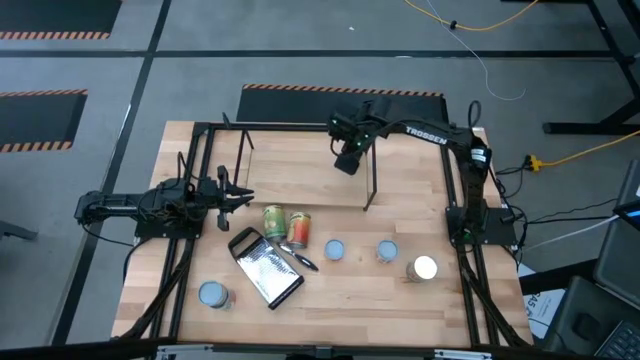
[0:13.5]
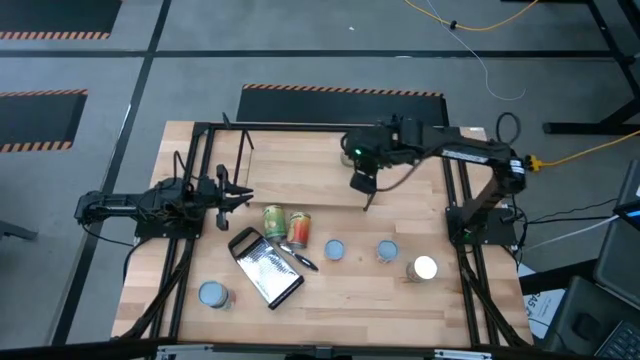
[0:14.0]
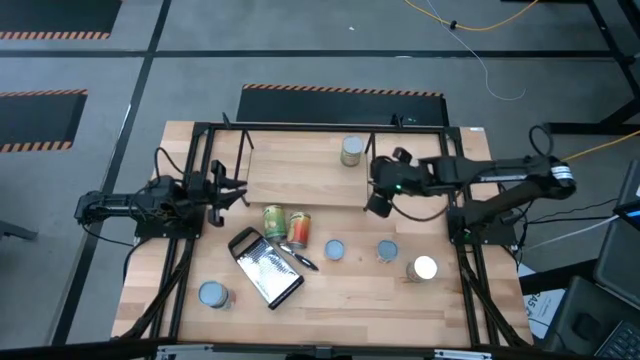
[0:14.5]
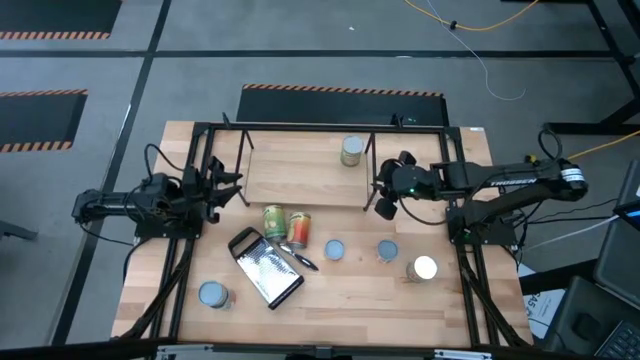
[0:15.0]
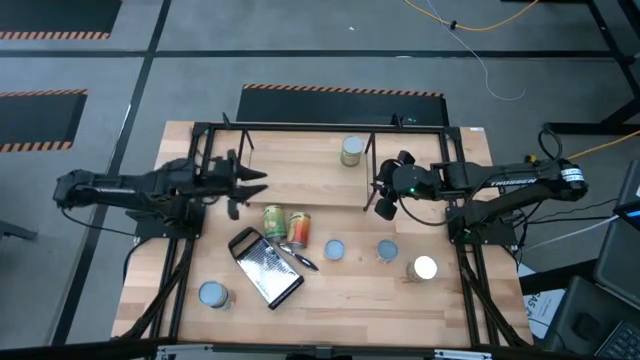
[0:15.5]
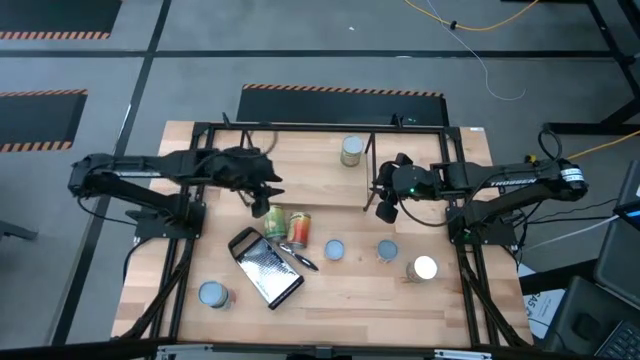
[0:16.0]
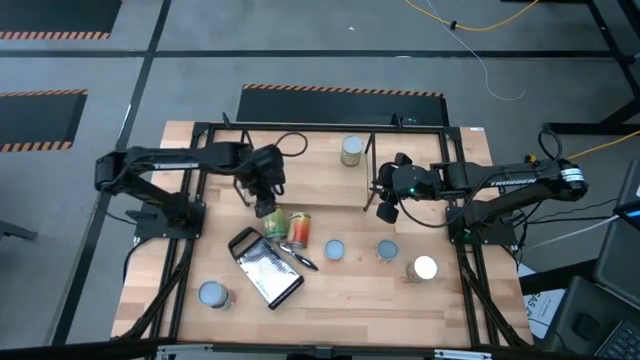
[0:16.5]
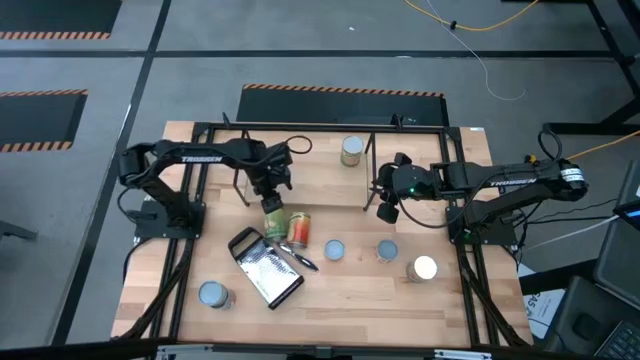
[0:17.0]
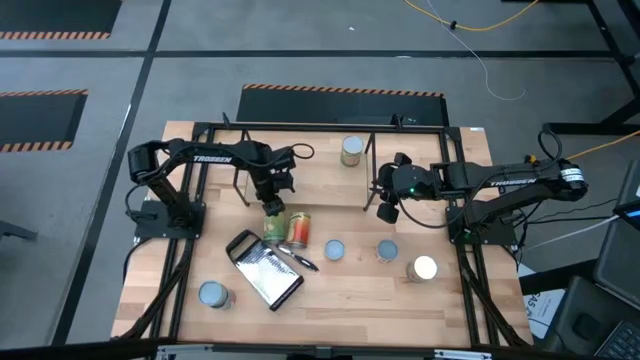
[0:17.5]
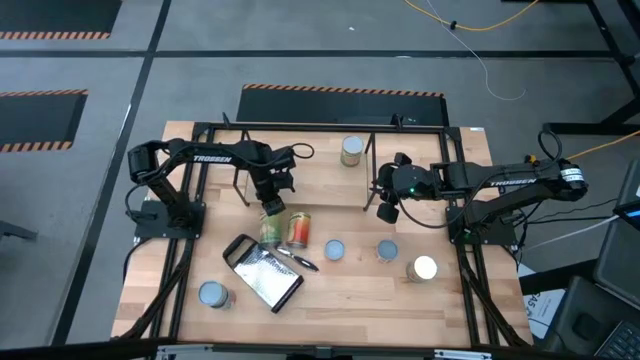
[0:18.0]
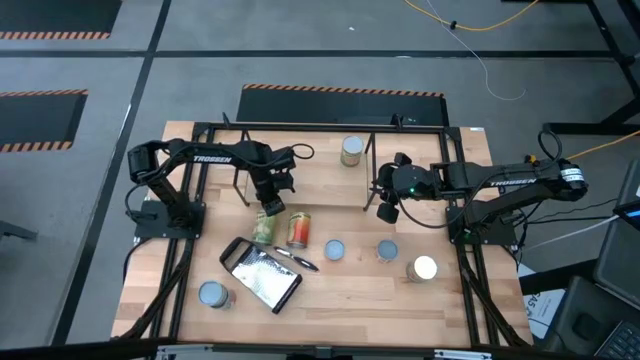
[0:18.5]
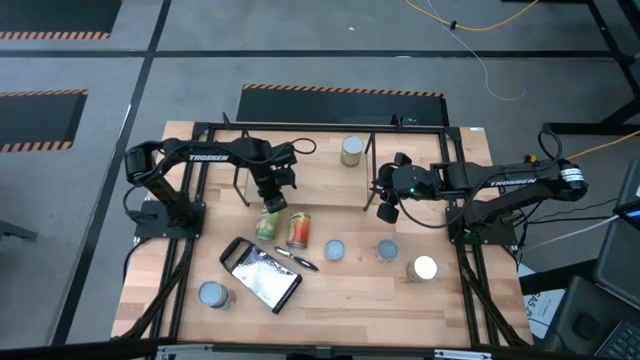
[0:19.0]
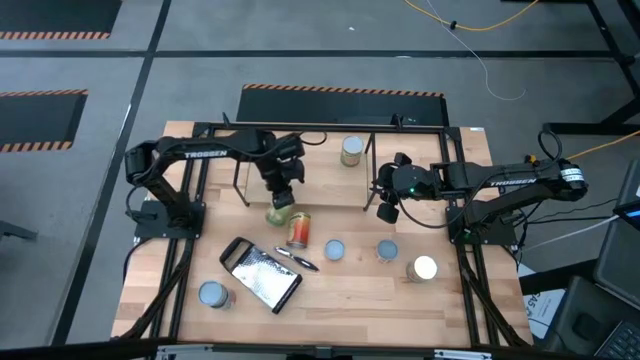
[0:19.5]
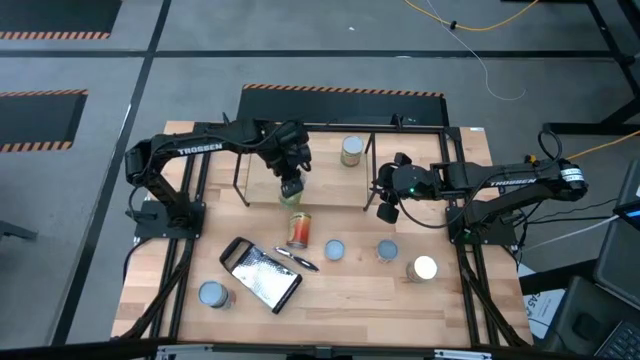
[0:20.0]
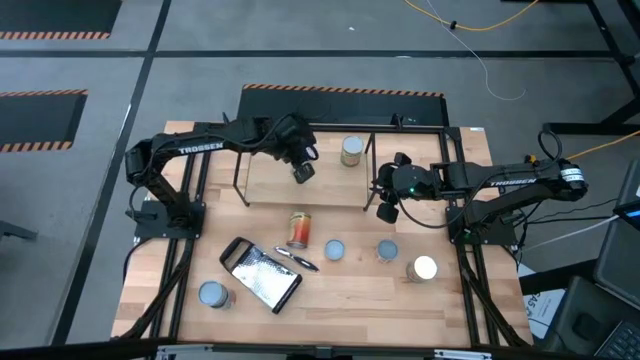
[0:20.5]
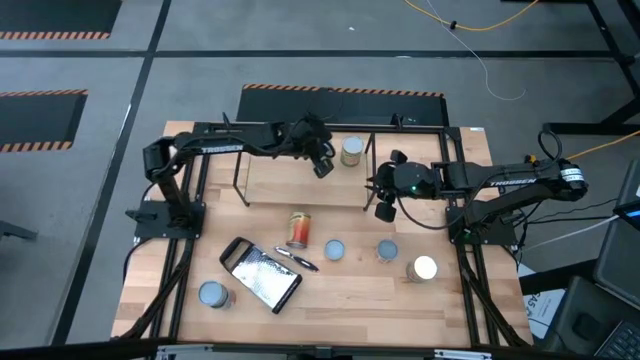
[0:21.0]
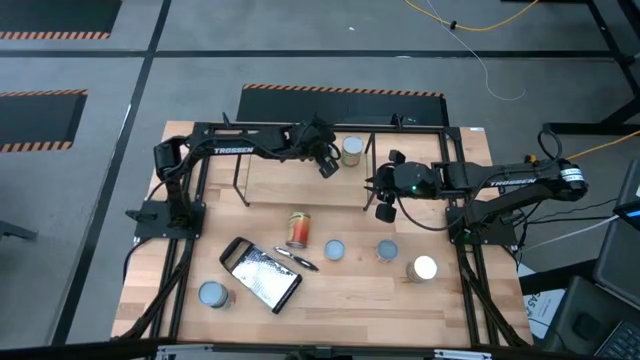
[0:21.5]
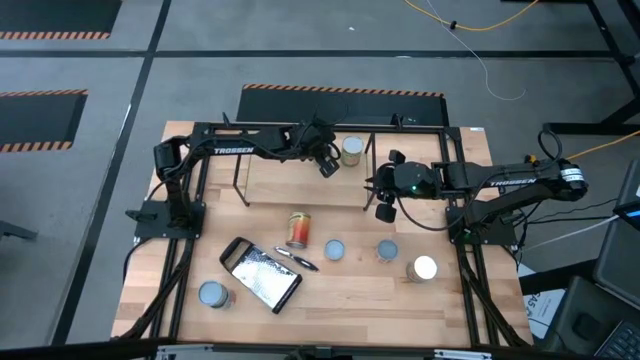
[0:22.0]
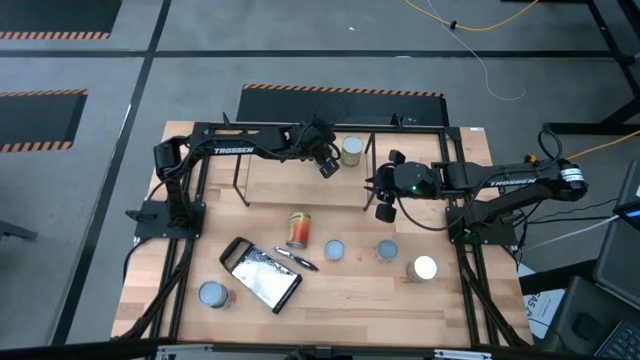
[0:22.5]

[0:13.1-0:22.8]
Task: Pick and place cans onto a shelf
Put the canned pears on the shelf

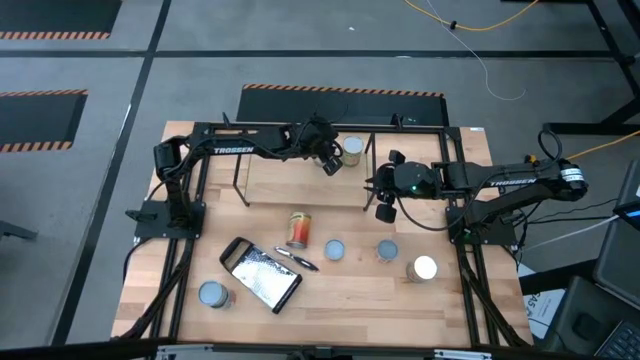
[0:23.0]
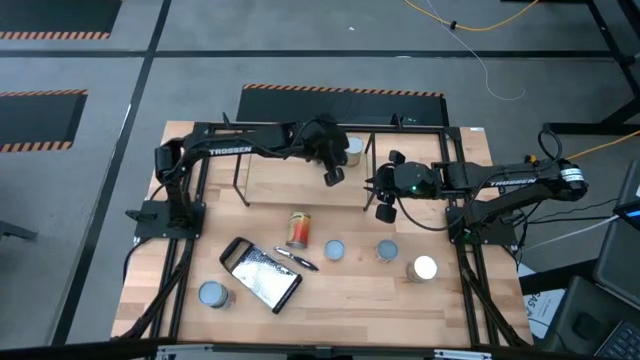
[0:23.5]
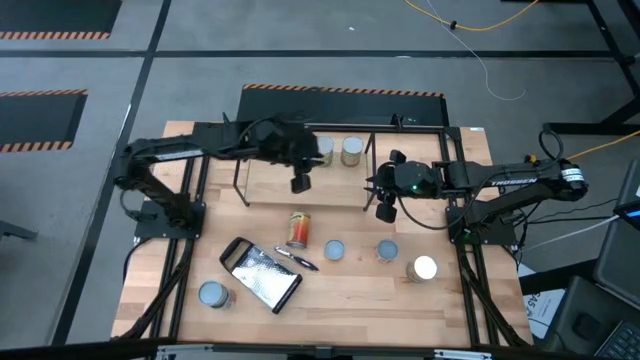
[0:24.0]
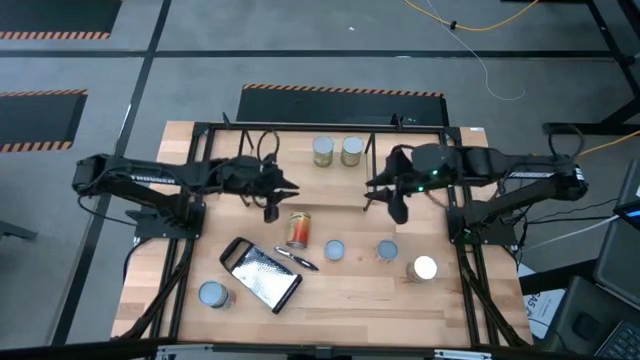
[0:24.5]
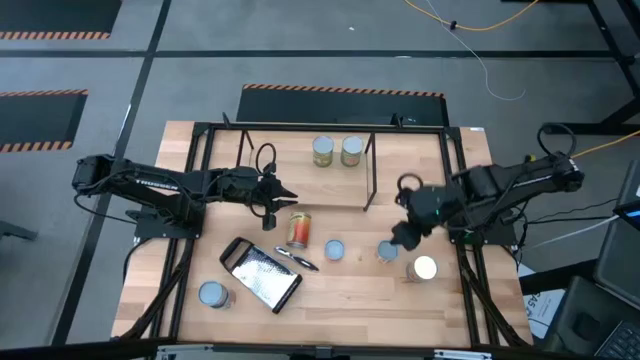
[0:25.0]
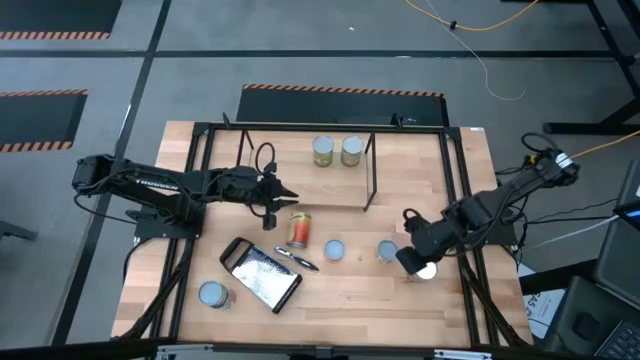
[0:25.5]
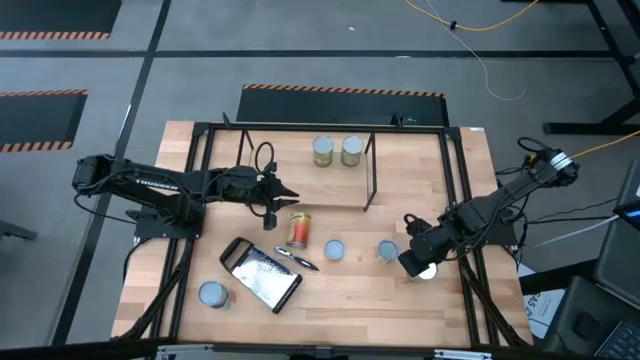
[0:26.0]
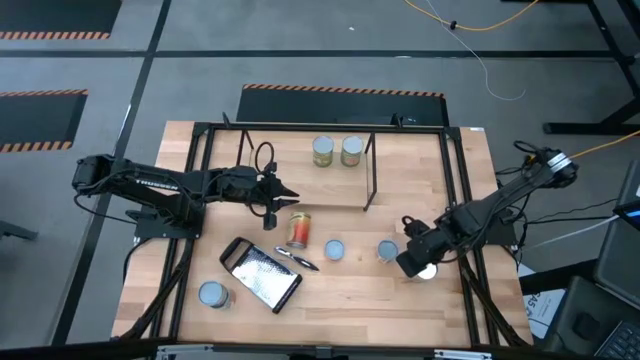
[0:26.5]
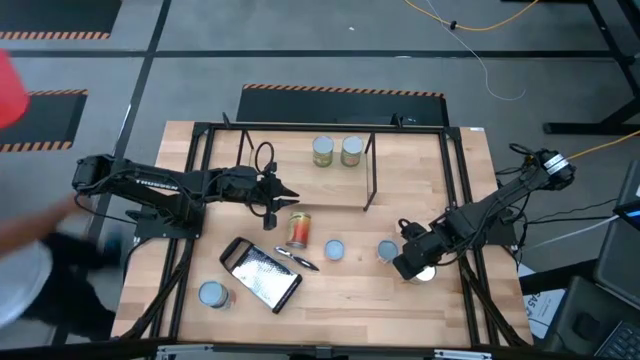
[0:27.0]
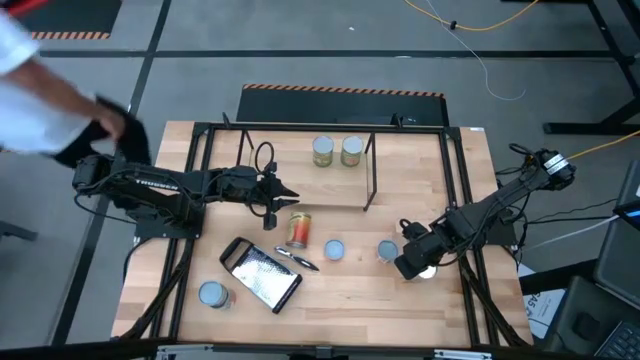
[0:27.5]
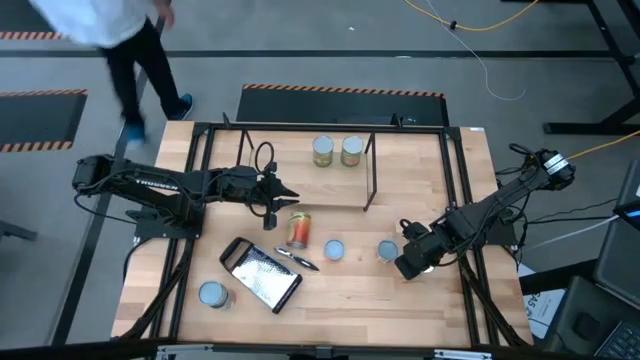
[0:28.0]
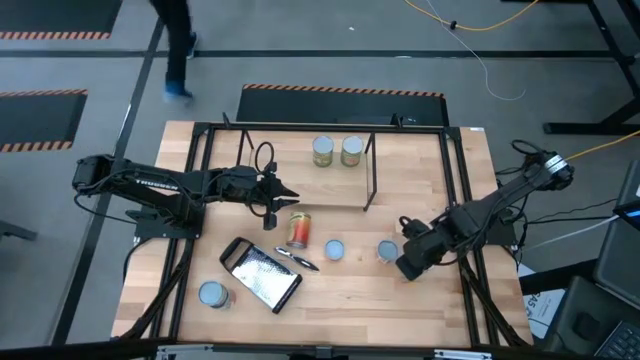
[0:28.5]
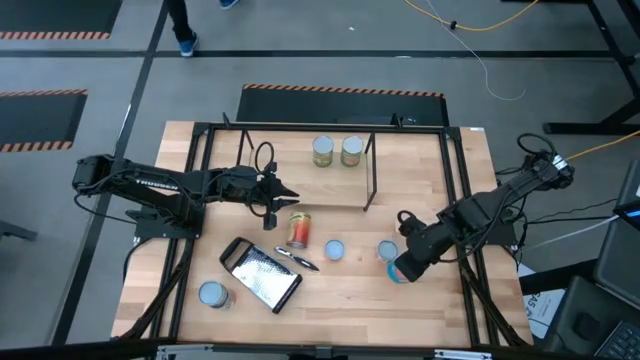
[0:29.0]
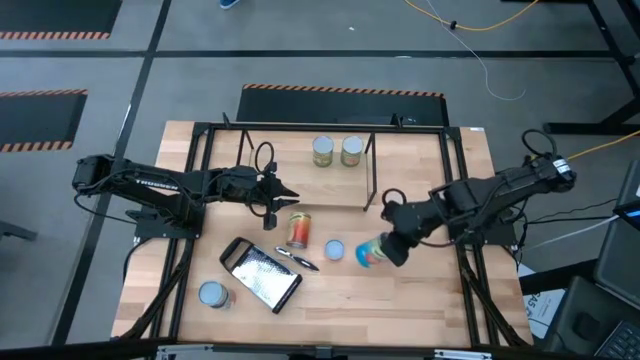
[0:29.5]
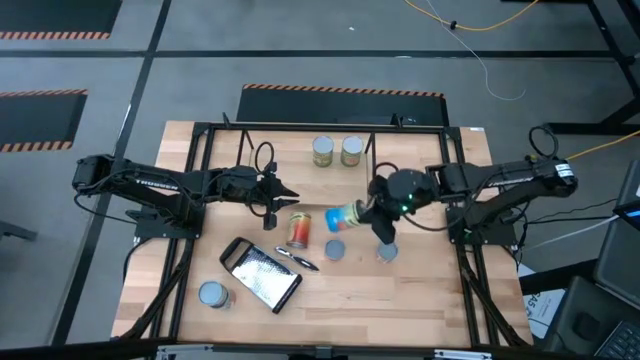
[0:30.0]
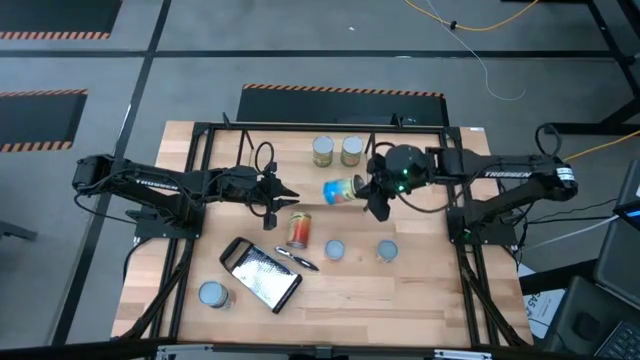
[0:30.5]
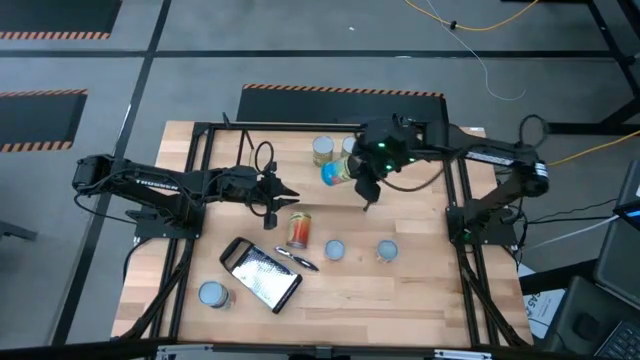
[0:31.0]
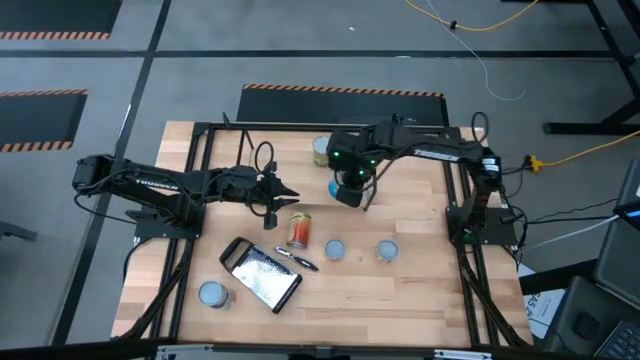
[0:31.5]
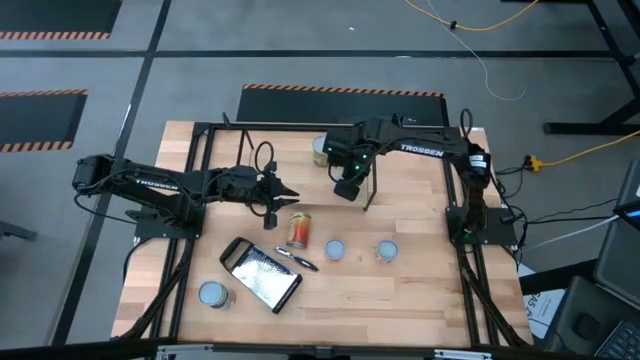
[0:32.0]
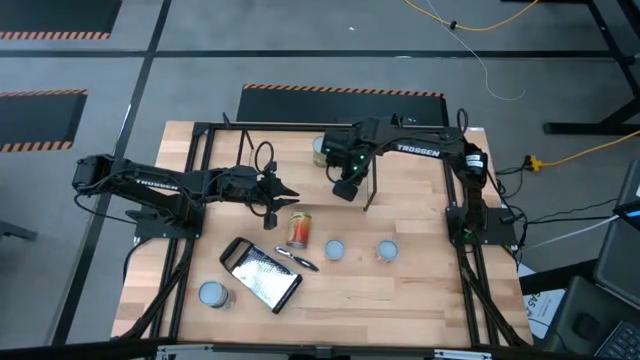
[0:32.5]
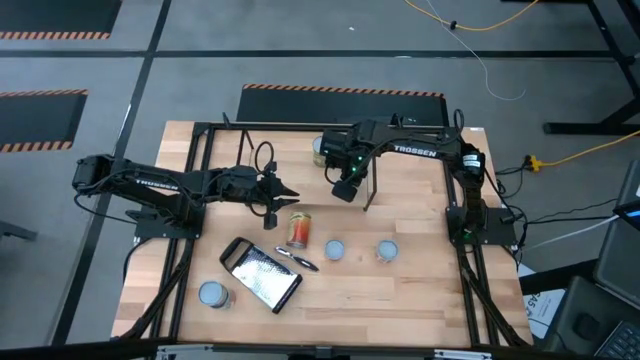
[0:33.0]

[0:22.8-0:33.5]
Put the canned tomatoes on the shelf

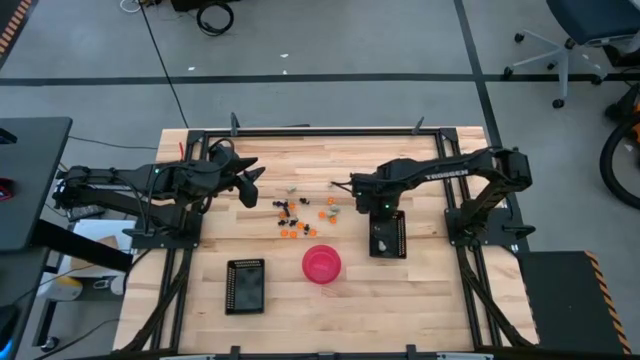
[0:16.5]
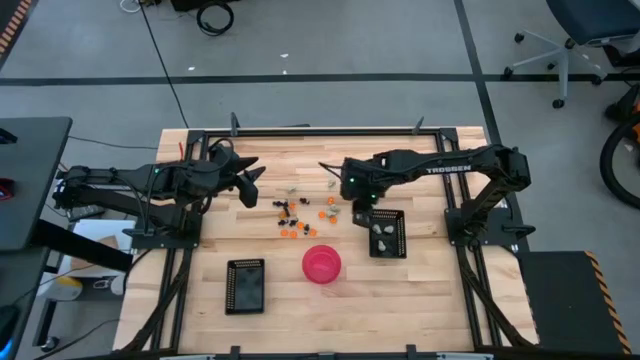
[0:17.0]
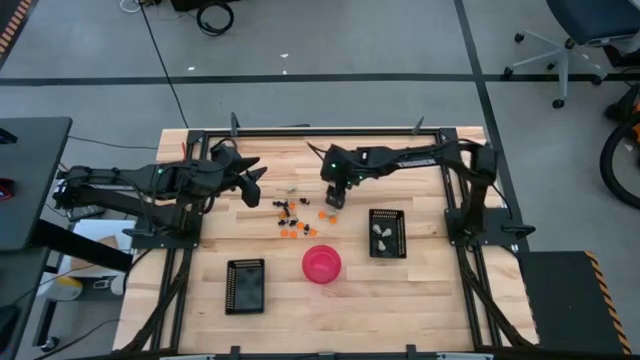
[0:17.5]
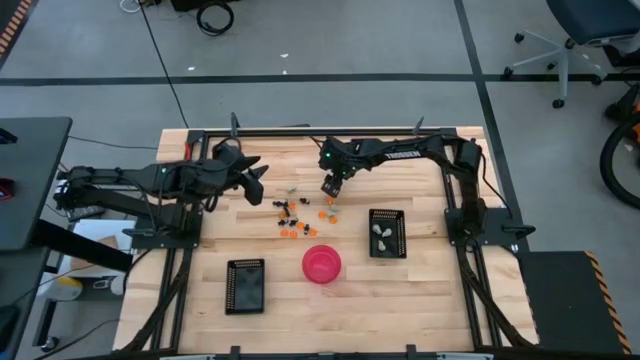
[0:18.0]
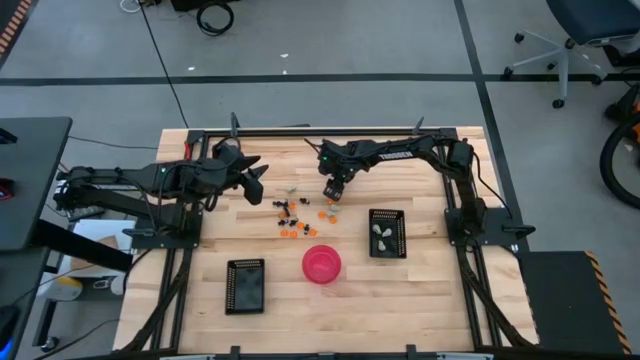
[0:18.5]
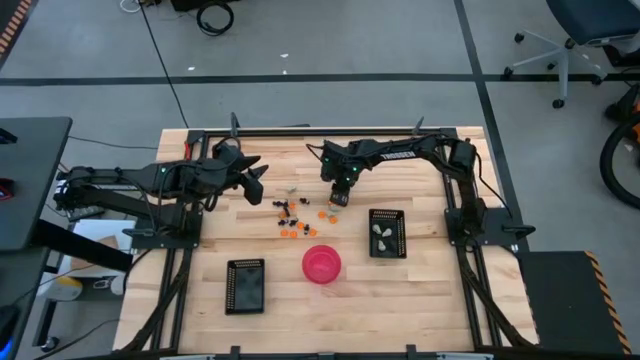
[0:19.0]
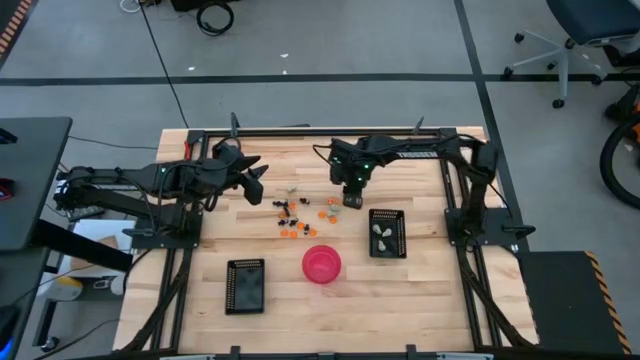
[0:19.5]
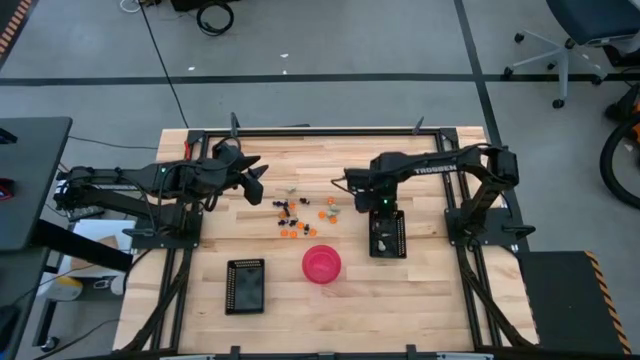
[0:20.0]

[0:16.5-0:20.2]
Task: Sort Halloween decoration
Put the white skull toy into the top black bin
